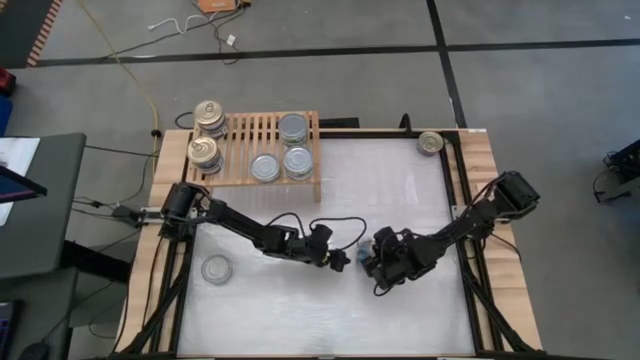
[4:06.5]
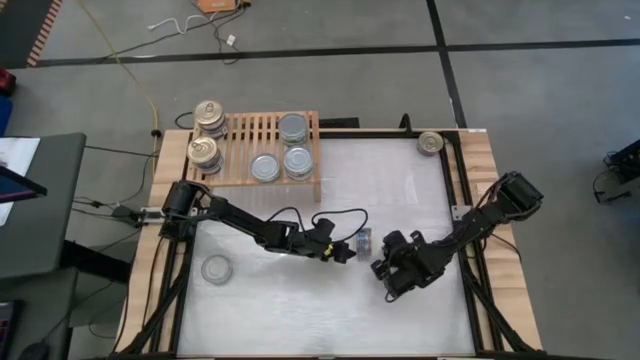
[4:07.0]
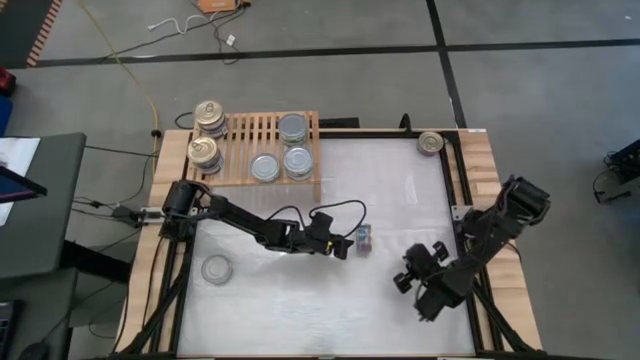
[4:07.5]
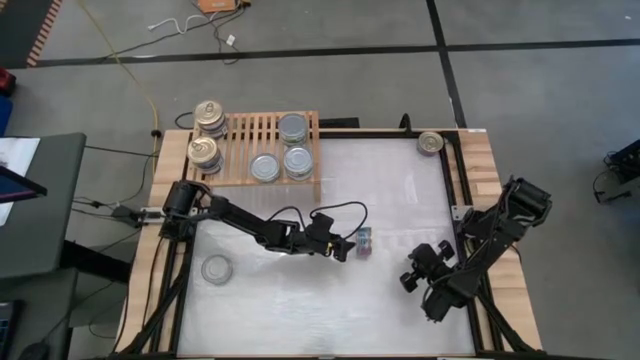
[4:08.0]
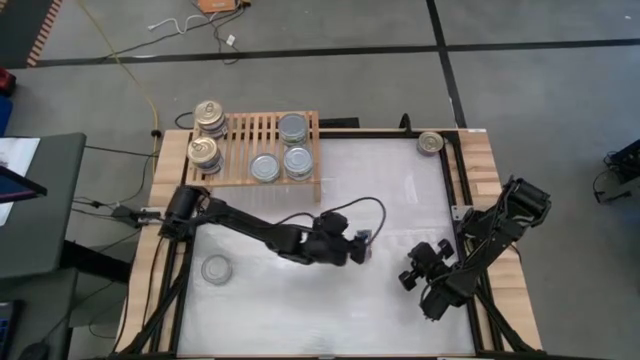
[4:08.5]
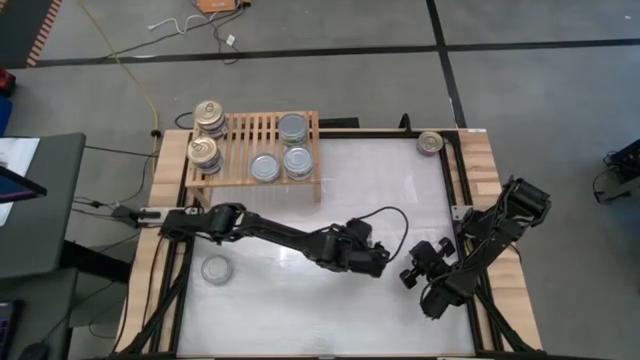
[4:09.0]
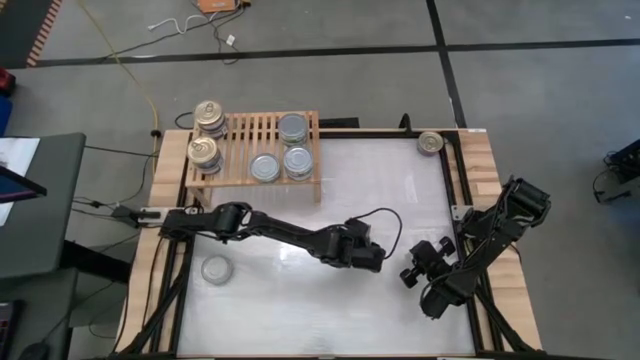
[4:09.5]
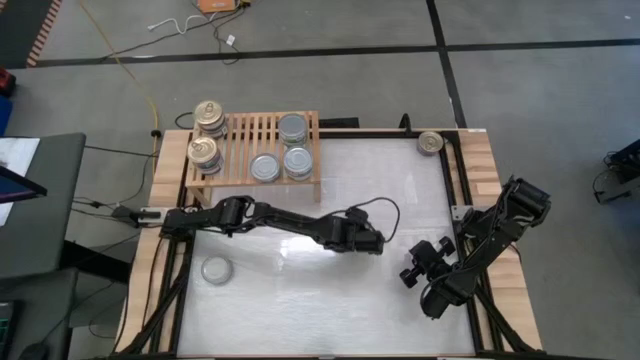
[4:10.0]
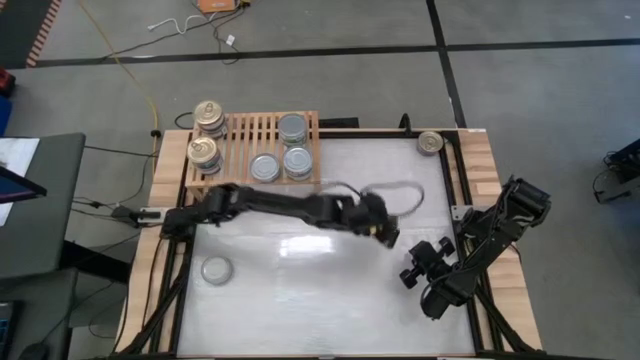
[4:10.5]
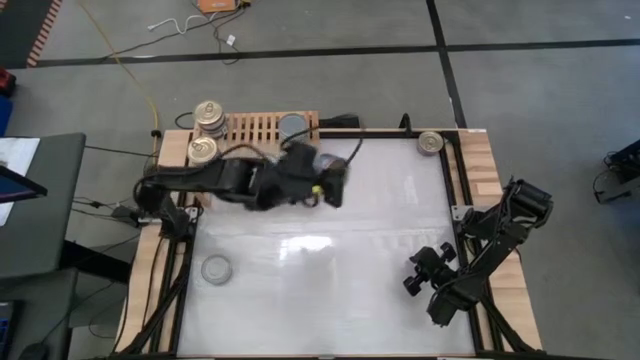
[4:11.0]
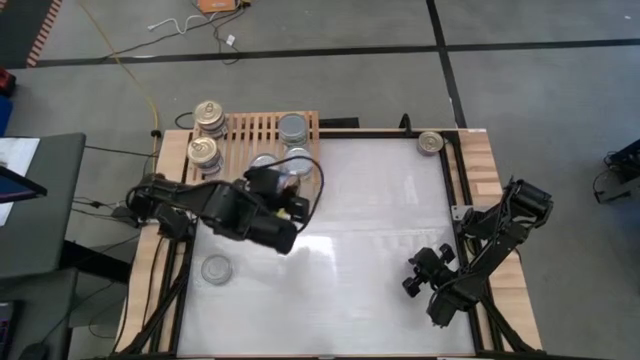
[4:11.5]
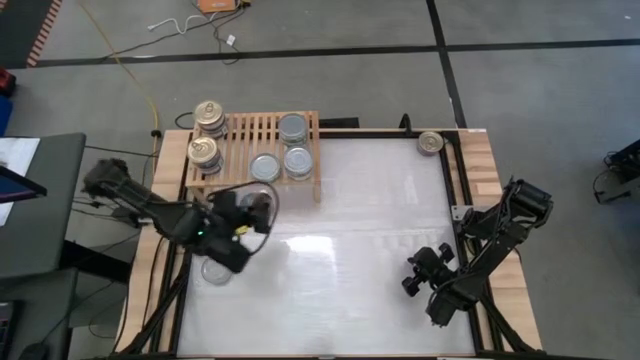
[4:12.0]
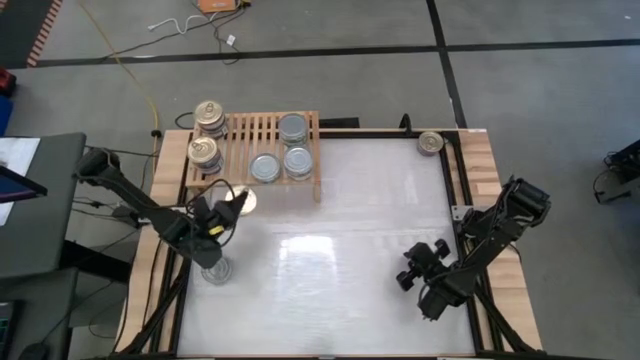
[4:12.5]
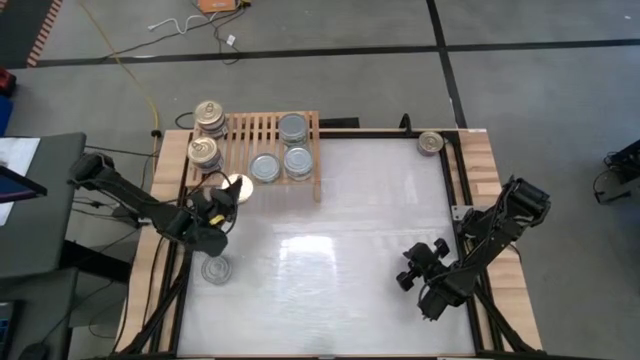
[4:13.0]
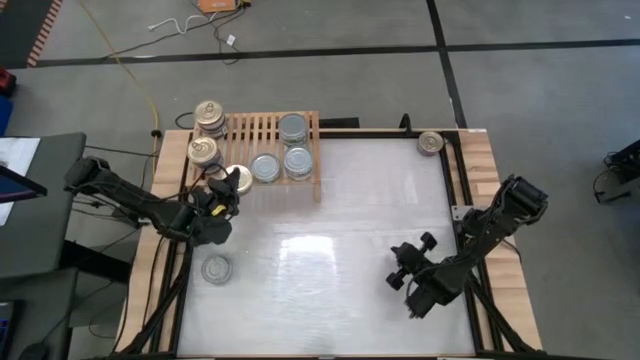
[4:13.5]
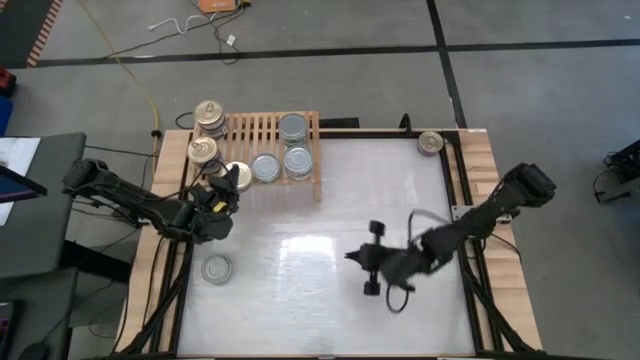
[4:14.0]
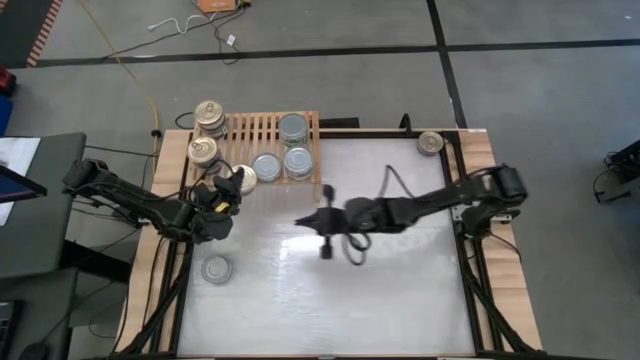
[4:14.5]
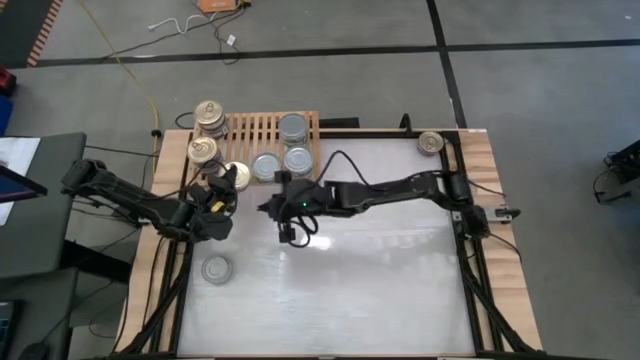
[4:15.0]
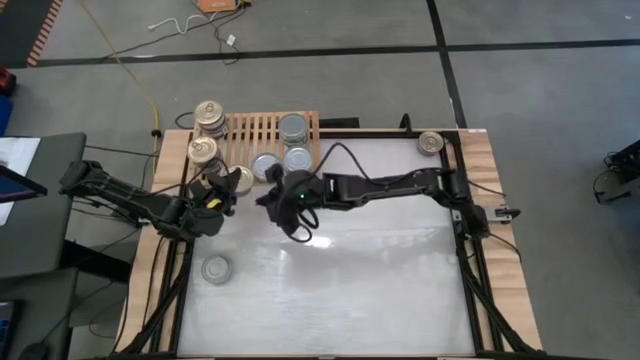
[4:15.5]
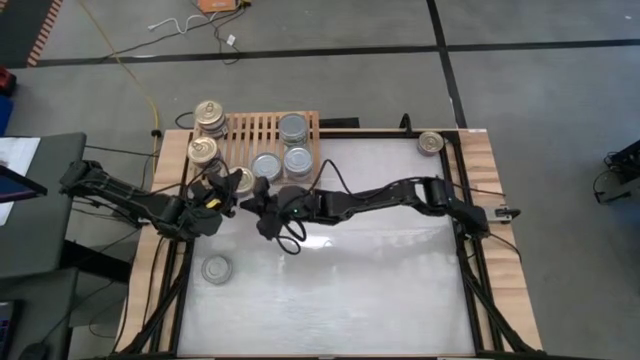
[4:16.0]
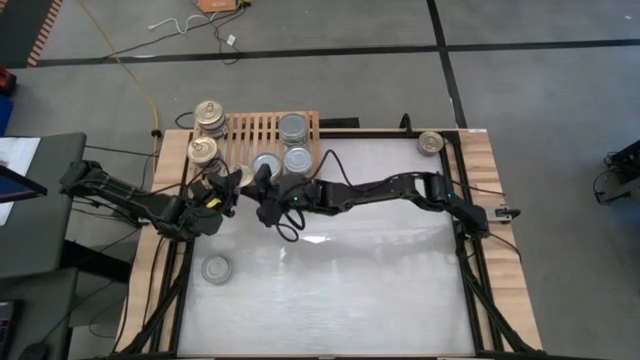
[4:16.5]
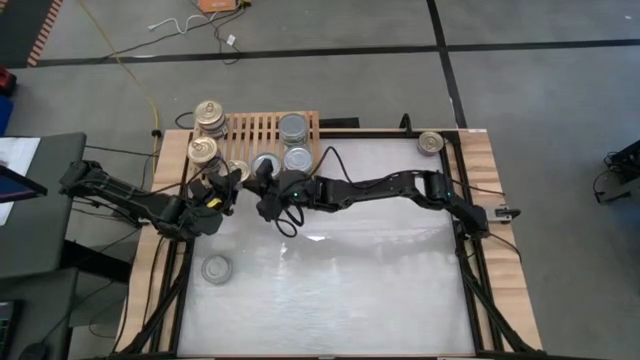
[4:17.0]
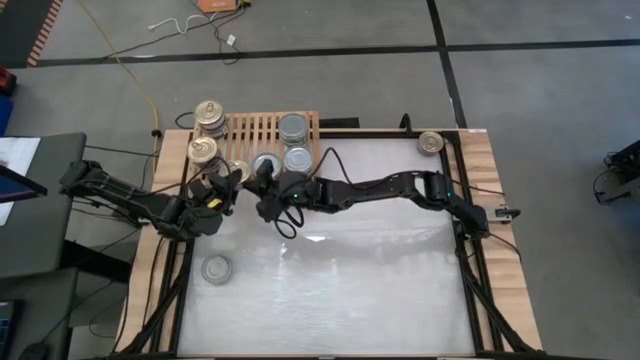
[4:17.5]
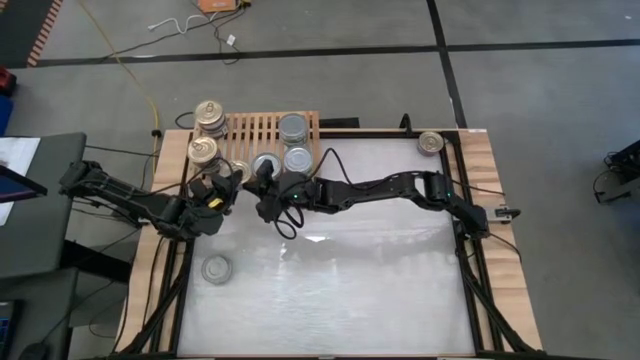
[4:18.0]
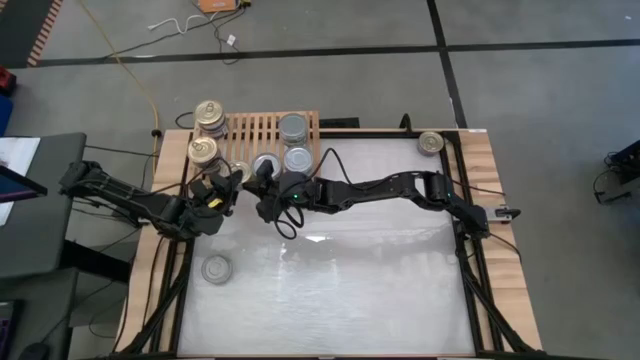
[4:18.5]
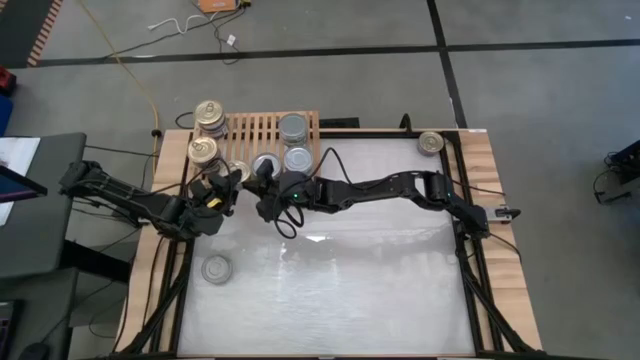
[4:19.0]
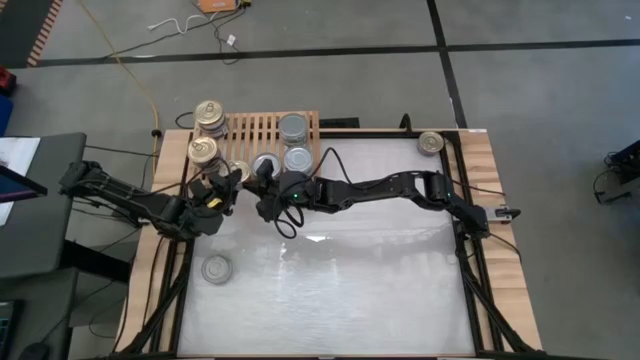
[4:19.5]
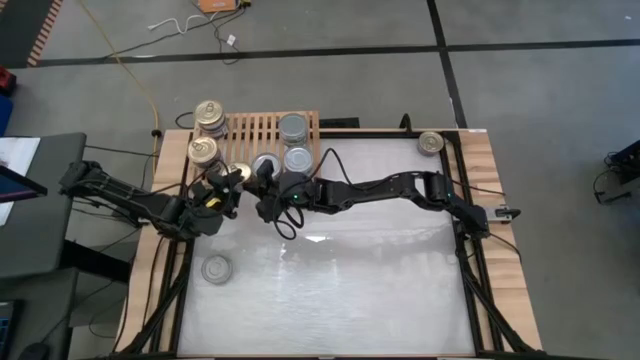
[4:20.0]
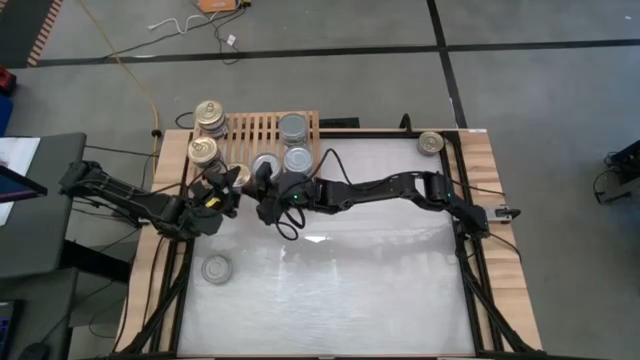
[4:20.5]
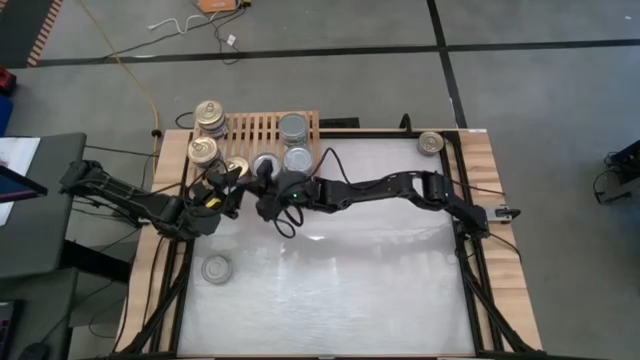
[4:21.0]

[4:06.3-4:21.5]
Task: Stack canned seafood by type on shelf
Put the blue tuna on the shelf

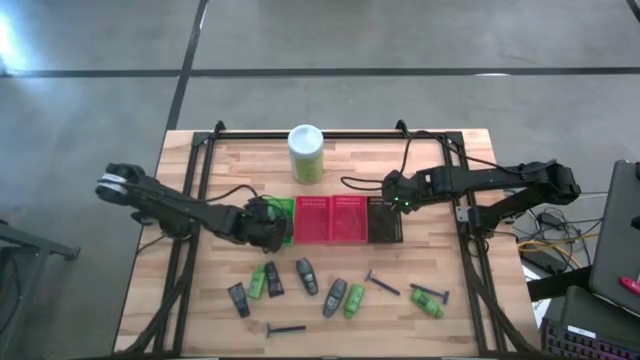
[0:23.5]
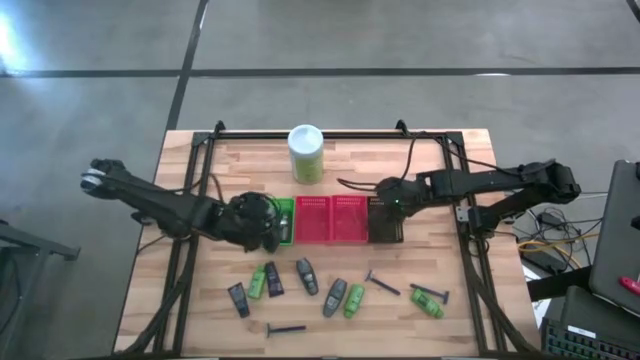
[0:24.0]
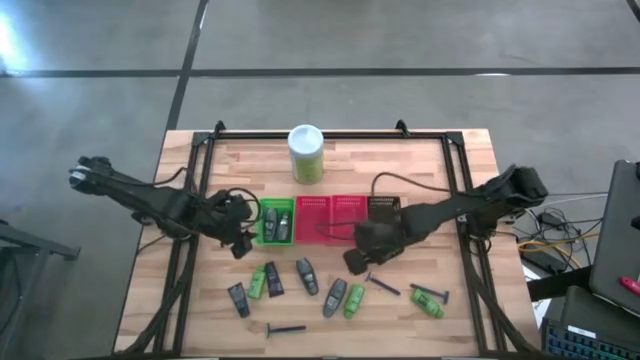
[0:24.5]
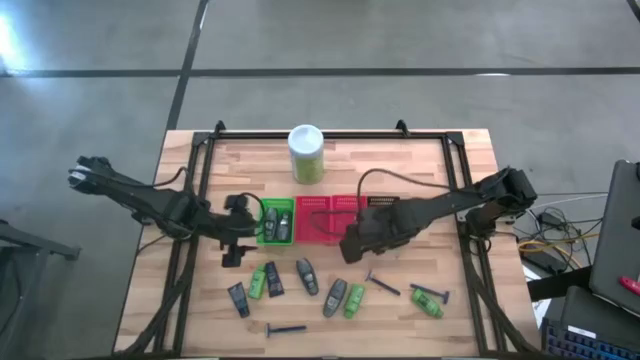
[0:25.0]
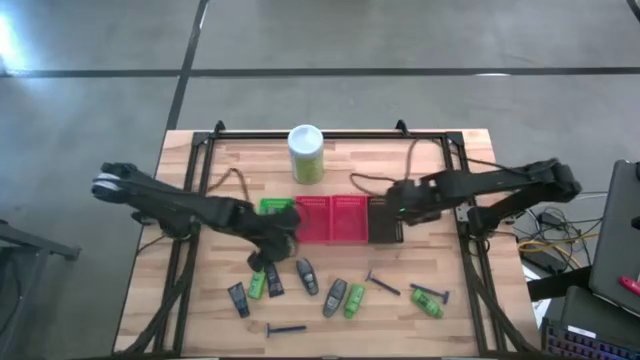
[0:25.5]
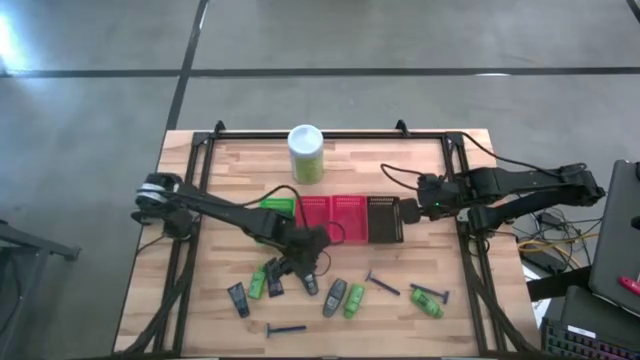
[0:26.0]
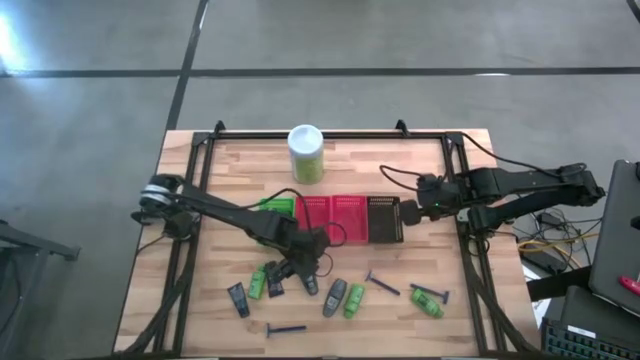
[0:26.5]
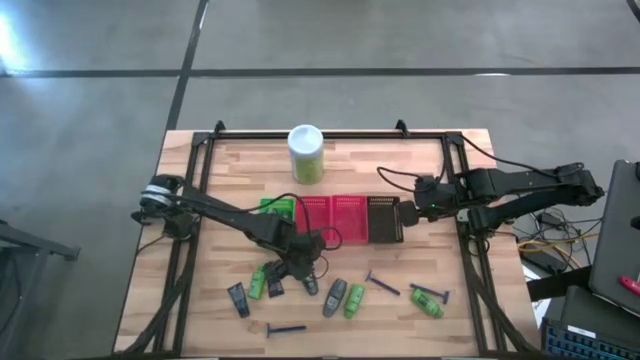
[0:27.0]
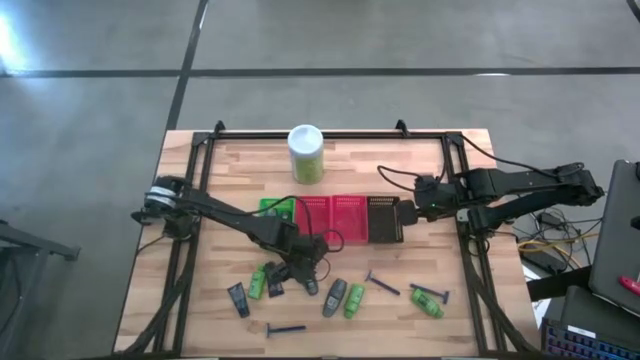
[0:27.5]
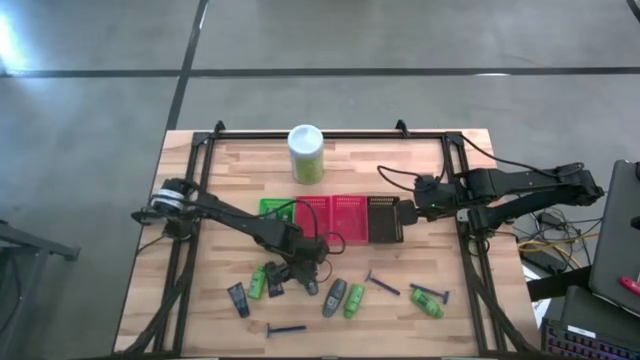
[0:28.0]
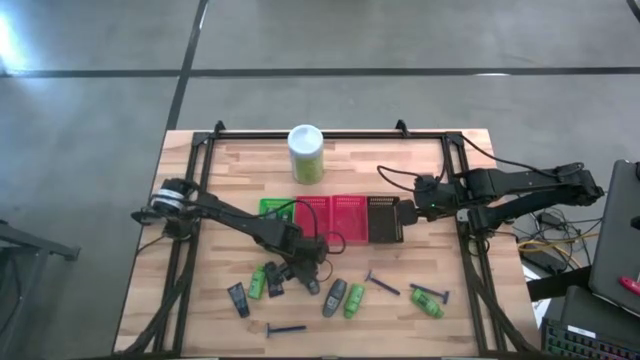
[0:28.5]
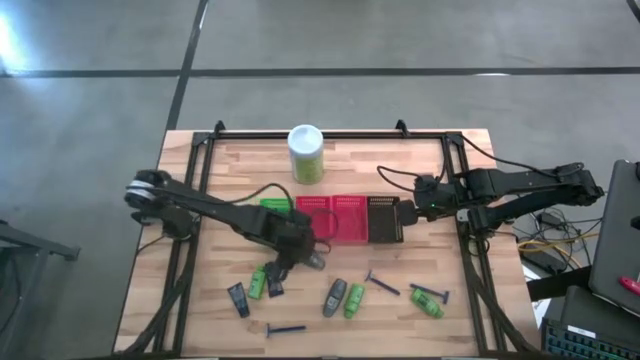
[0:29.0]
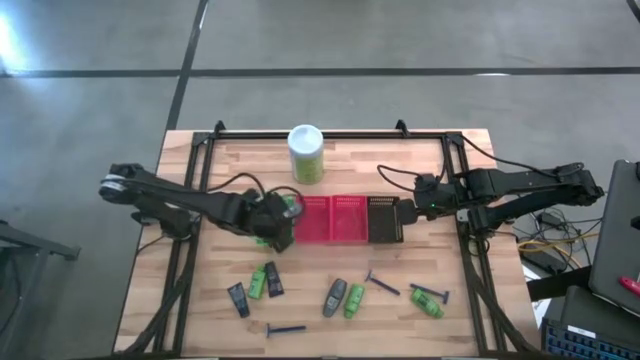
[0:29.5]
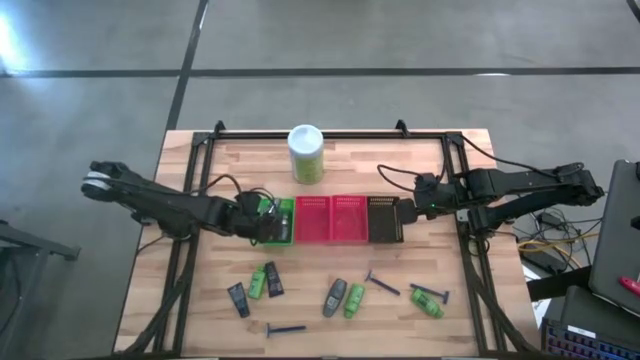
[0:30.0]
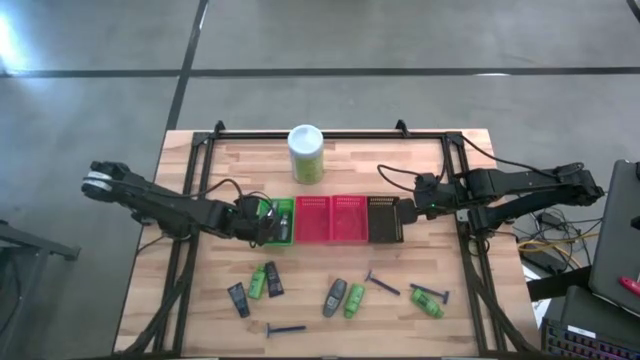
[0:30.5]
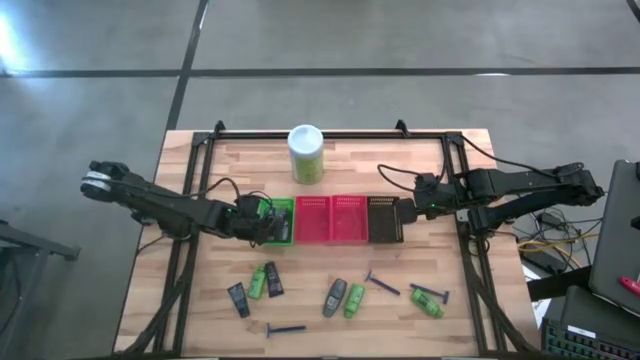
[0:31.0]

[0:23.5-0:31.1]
Task: Pick & Place Travel size toiletries
Put the gray deodorant into the green bin
